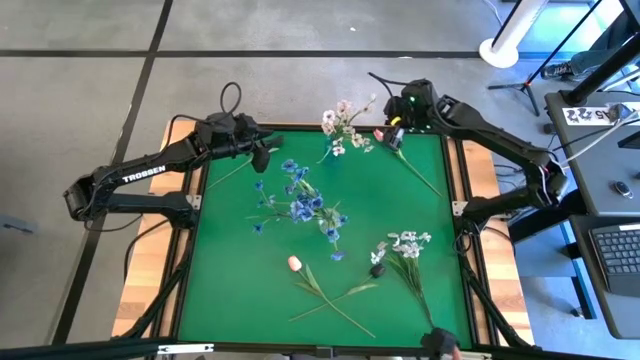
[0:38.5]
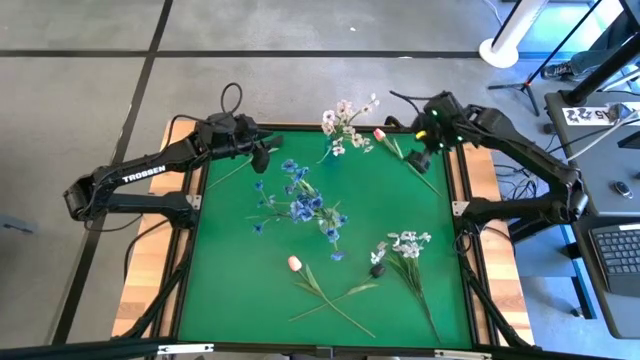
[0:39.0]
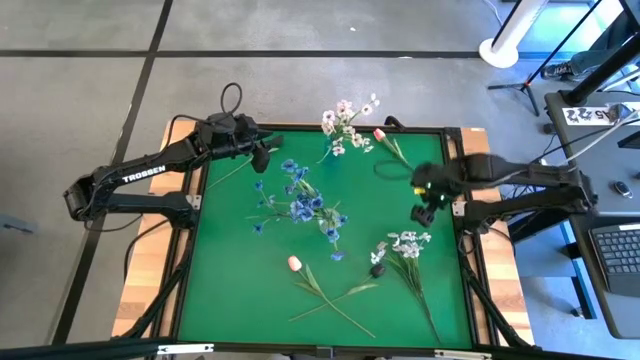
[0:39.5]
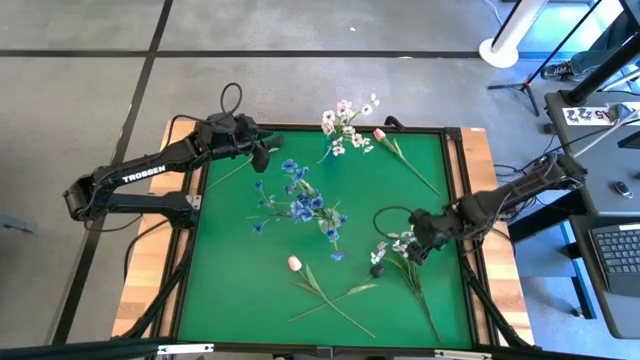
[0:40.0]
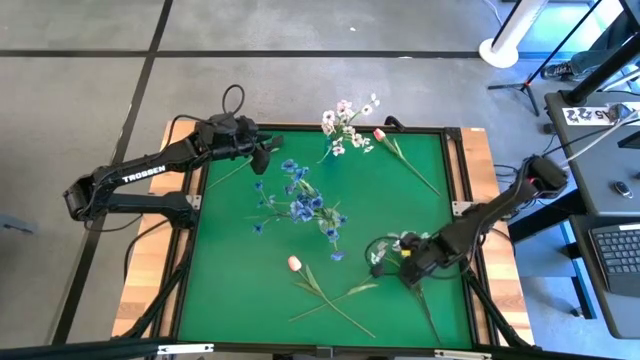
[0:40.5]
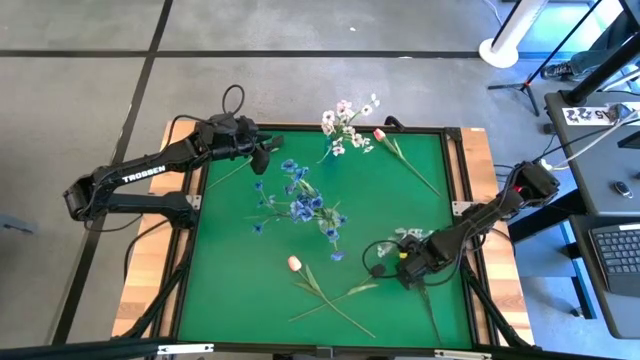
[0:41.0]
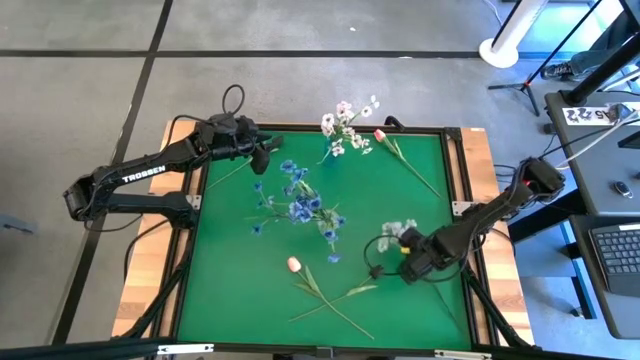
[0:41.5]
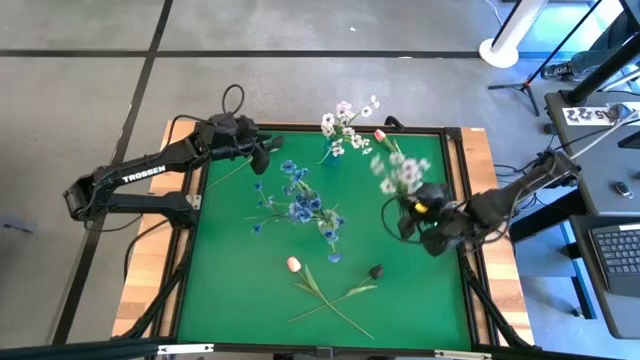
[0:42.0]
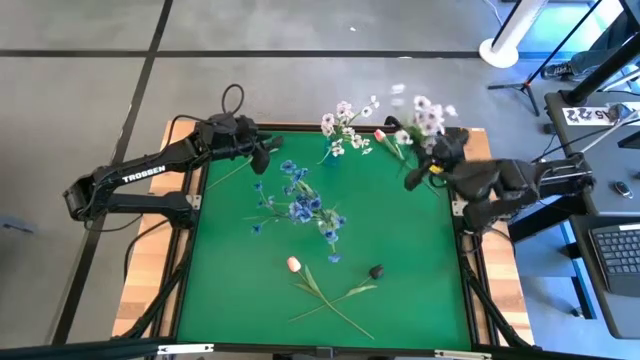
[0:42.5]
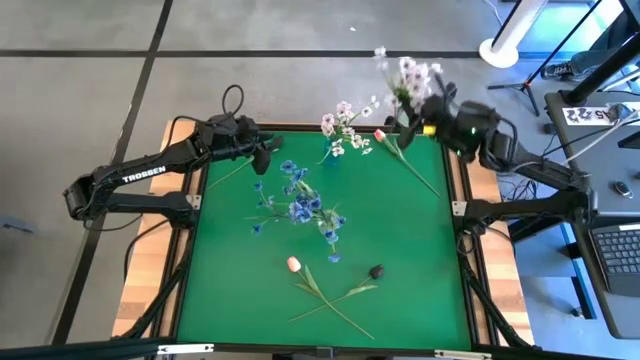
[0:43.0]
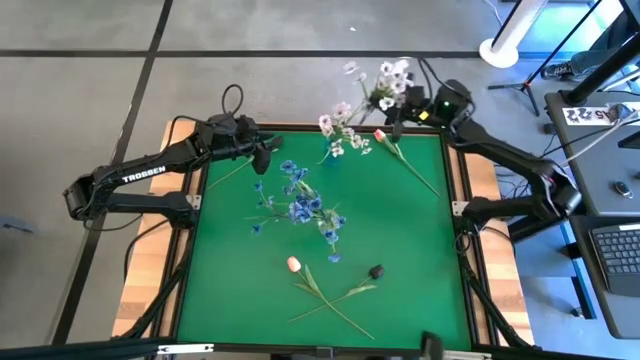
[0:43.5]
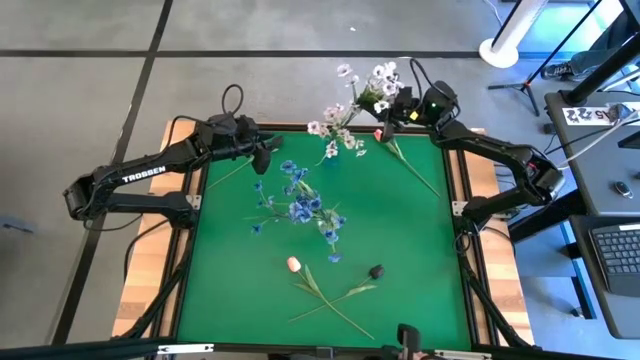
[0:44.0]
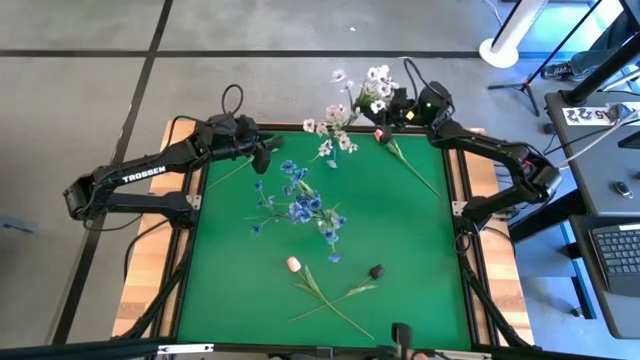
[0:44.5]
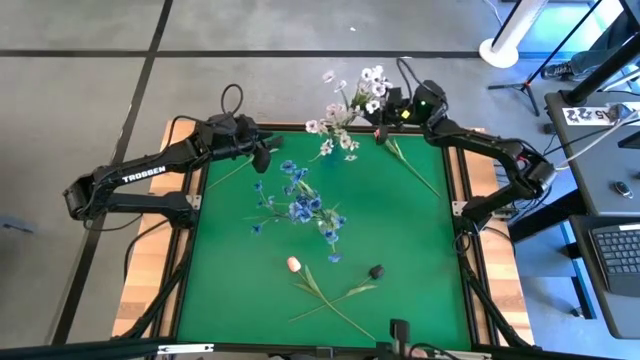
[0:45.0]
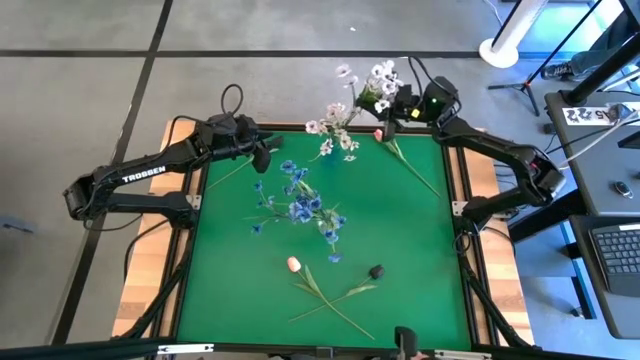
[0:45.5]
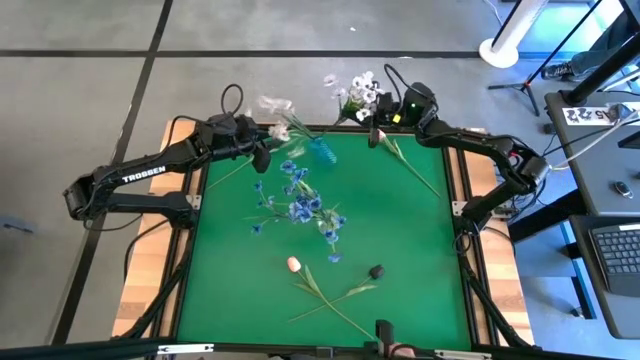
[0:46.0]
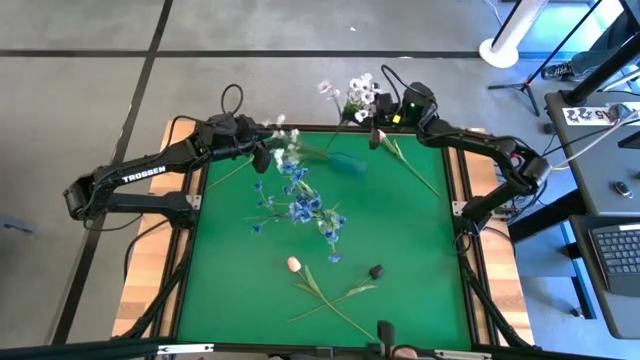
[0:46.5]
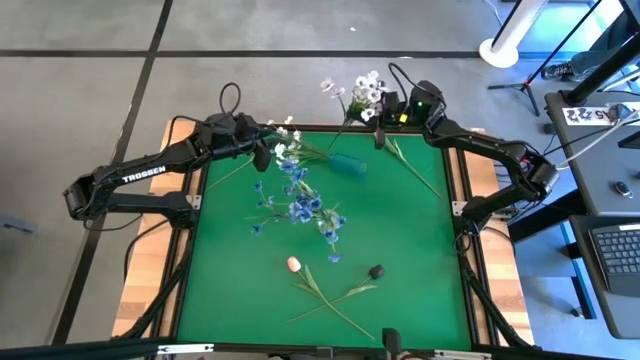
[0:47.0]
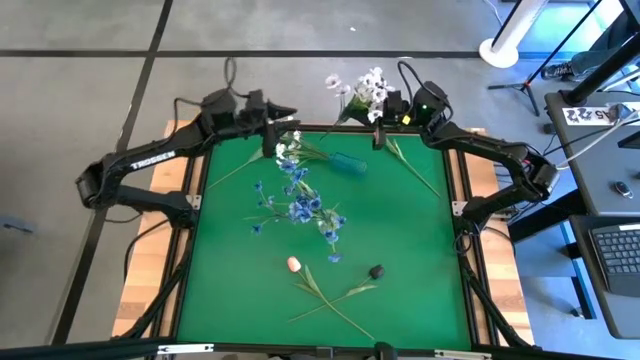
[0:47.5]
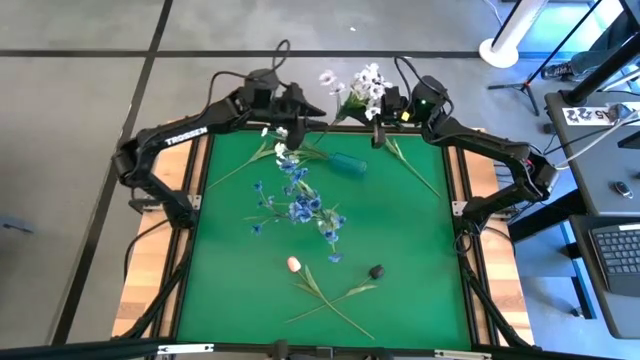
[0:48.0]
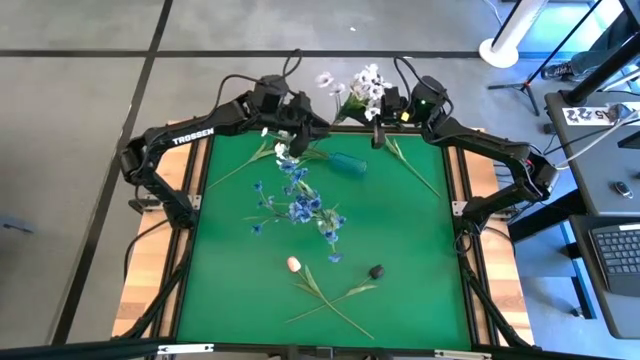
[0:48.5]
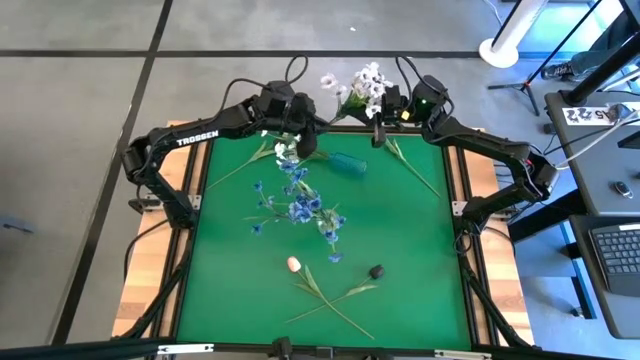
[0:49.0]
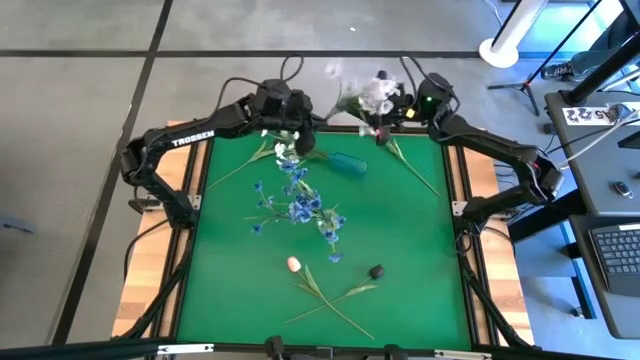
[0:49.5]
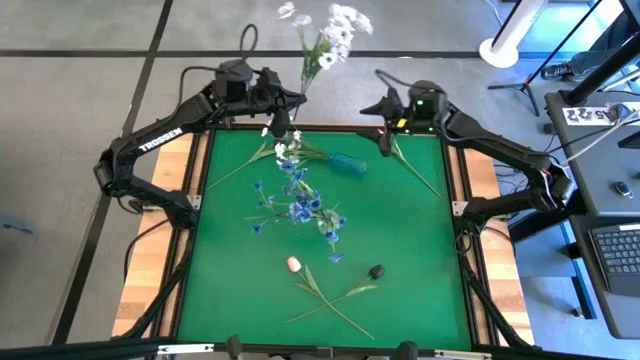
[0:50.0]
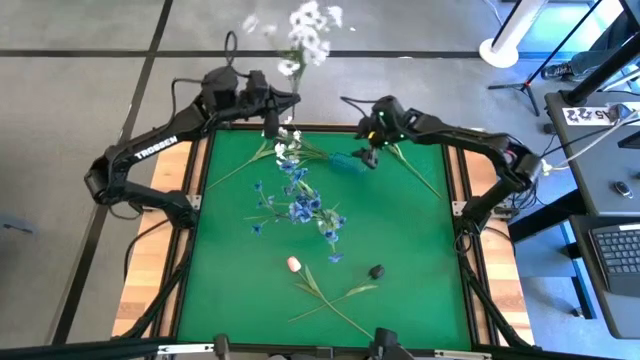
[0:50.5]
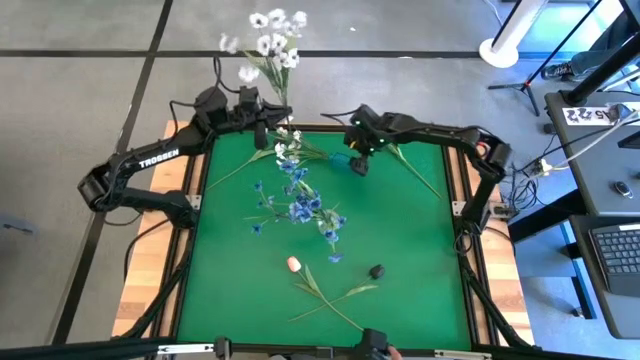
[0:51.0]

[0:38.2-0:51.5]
Task: Sort flowers into vase by color
Put the white flowers into the blue vase

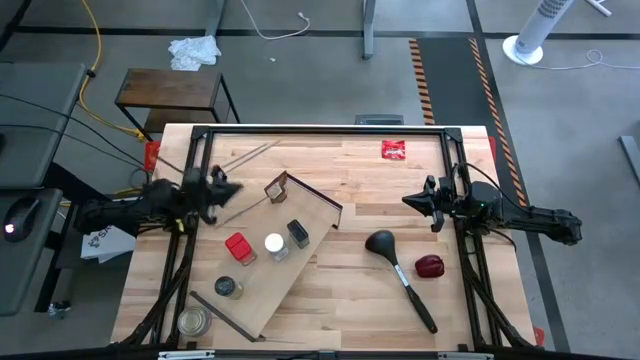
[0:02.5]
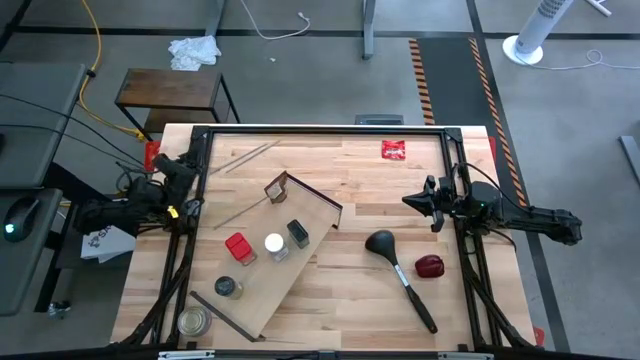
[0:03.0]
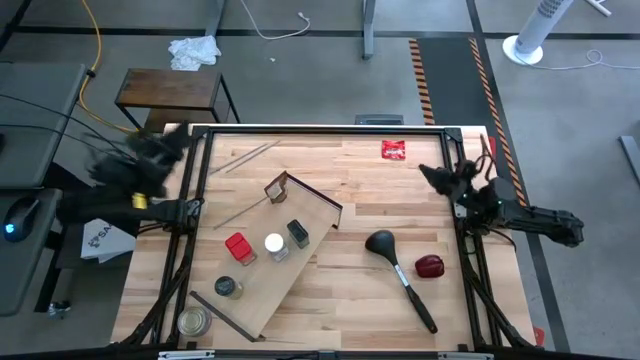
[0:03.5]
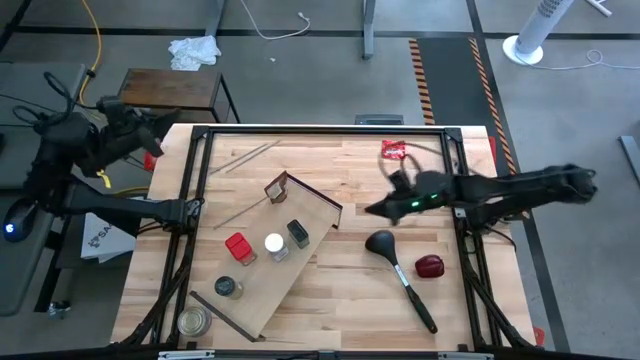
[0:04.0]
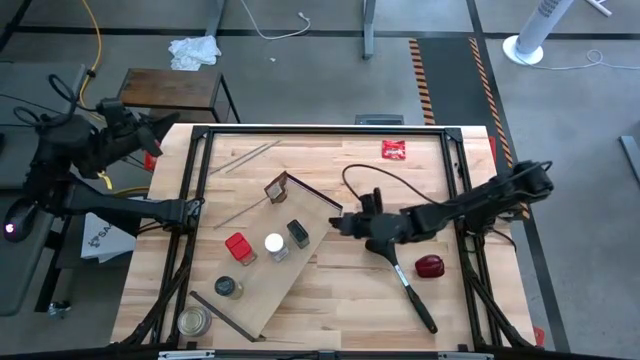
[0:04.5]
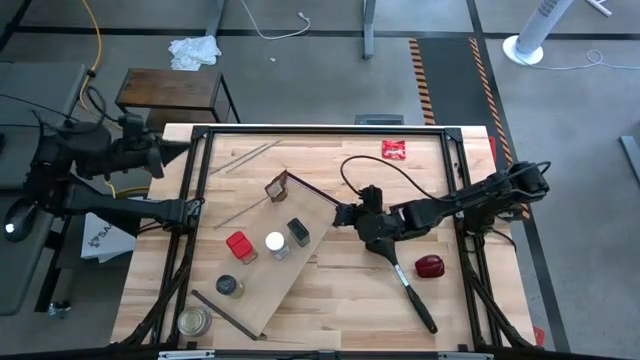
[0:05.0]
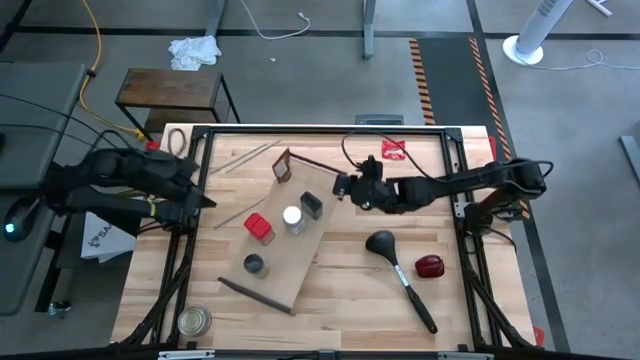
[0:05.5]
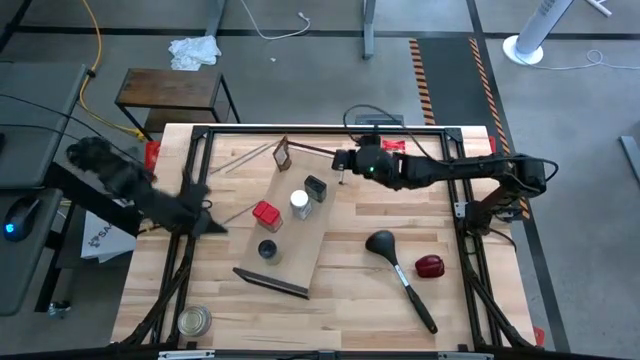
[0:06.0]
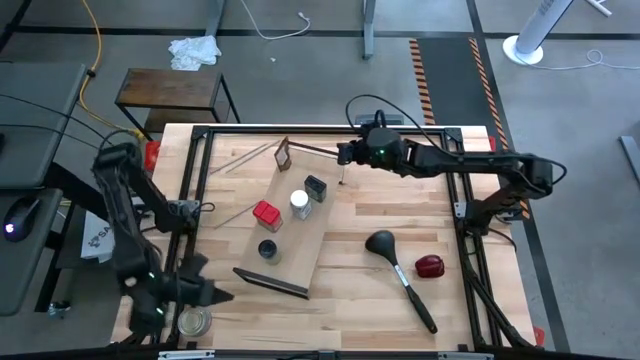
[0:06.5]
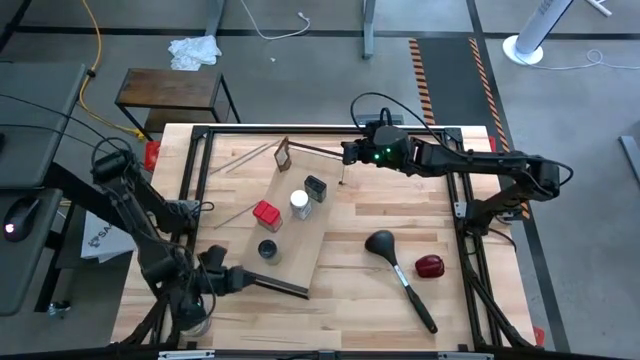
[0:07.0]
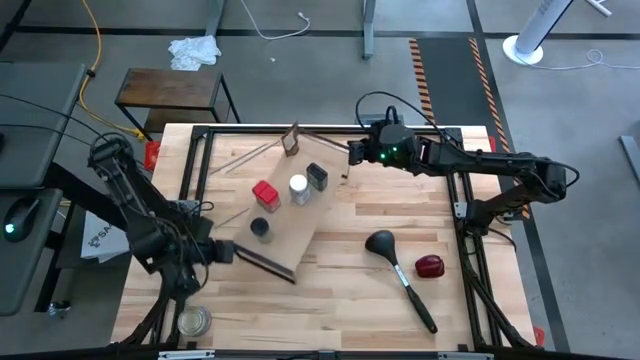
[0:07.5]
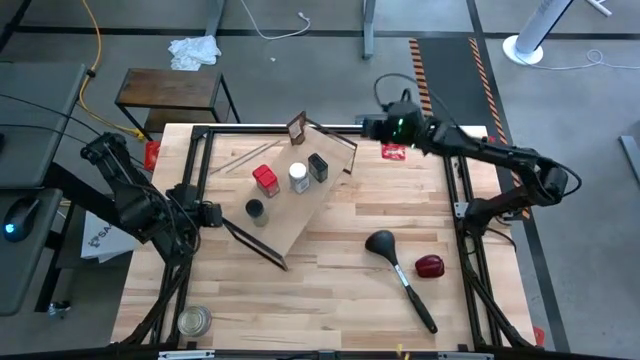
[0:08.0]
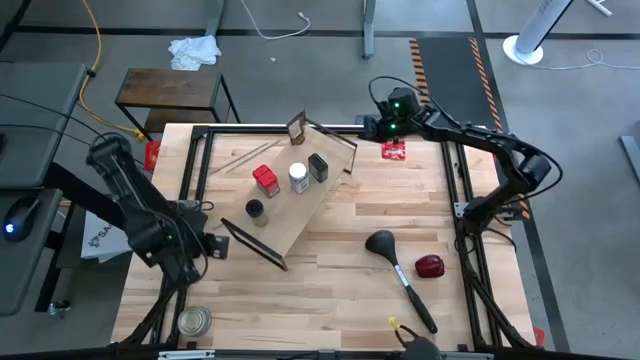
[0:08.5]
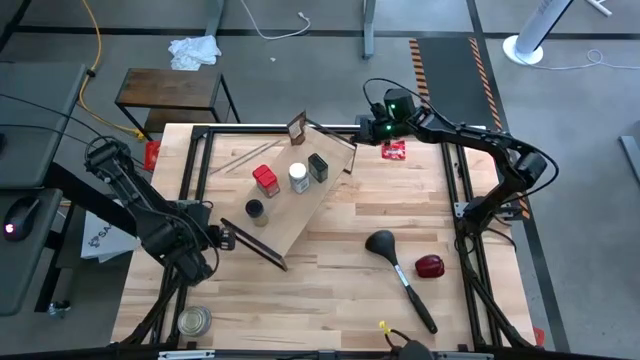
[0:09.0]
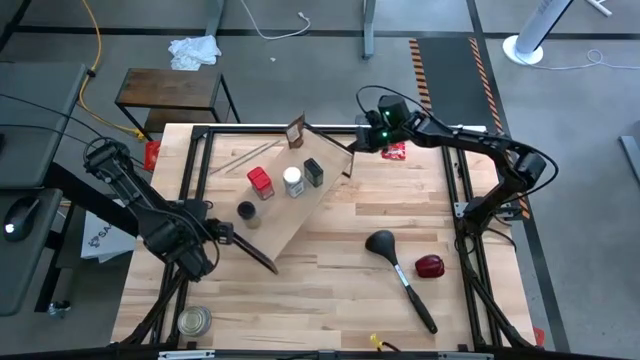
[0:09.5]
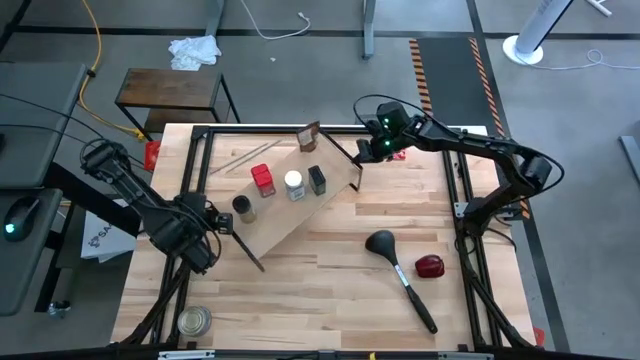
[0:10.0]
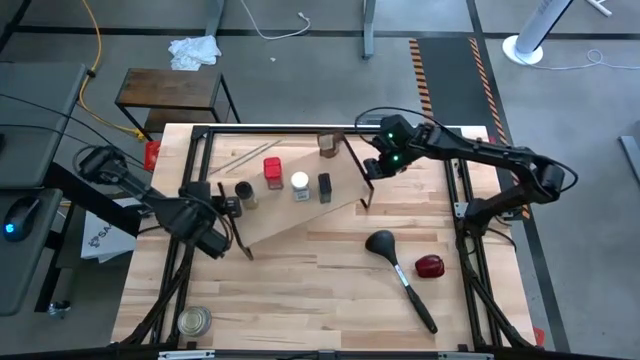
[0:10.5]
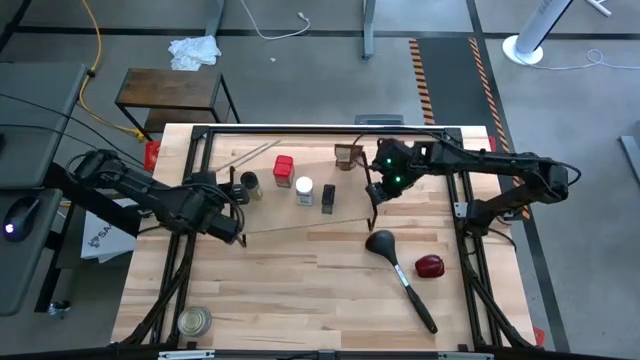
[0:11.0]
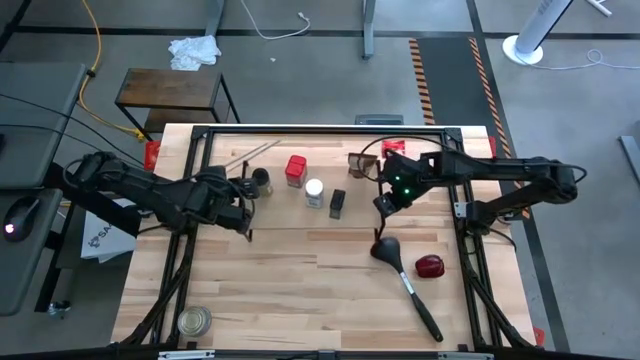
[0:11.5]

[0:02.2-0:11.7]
Task: Shelf spices
Prepare the shelf
